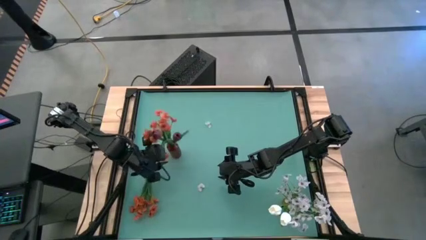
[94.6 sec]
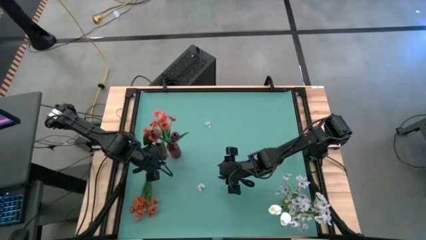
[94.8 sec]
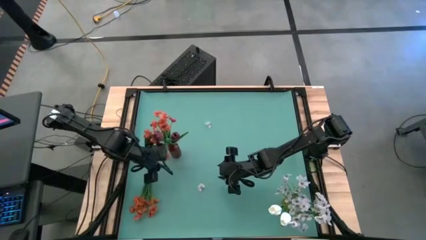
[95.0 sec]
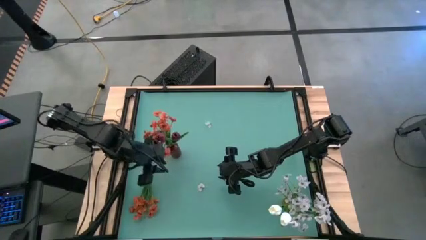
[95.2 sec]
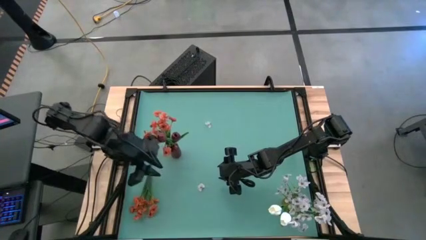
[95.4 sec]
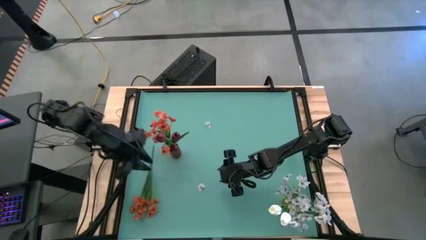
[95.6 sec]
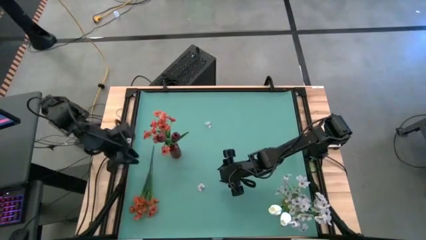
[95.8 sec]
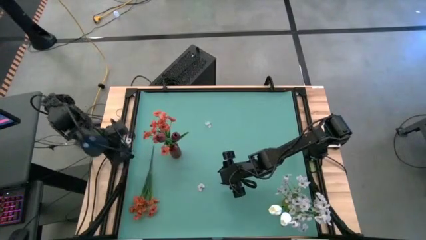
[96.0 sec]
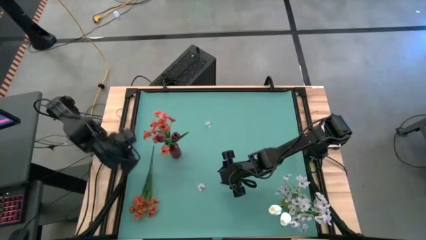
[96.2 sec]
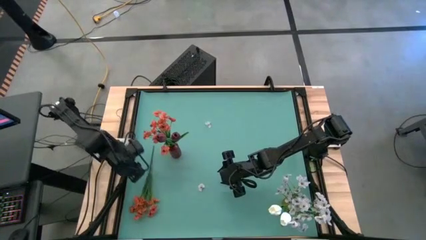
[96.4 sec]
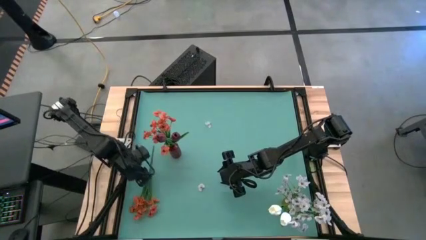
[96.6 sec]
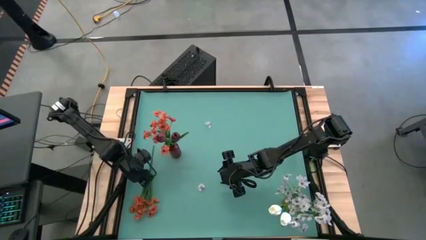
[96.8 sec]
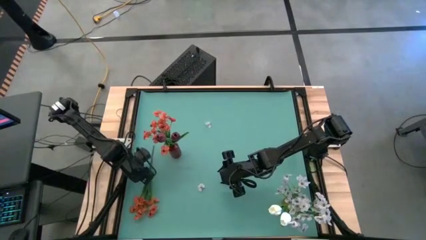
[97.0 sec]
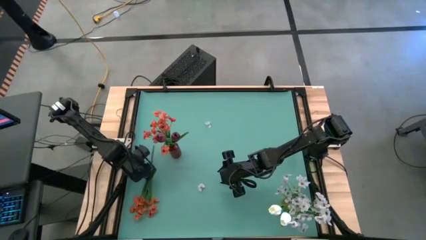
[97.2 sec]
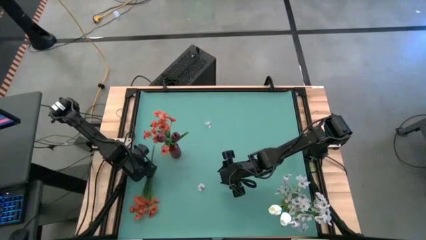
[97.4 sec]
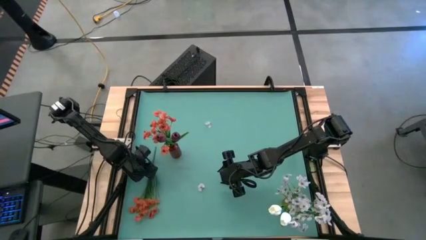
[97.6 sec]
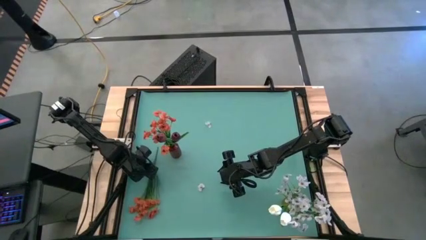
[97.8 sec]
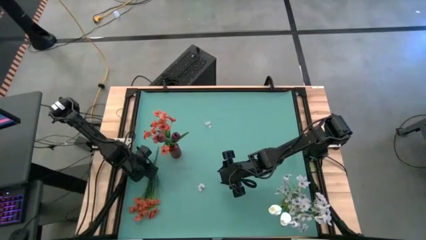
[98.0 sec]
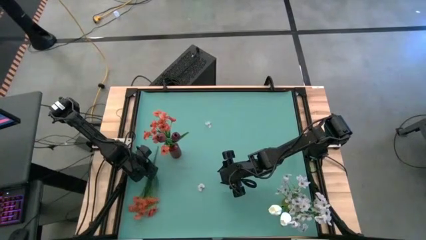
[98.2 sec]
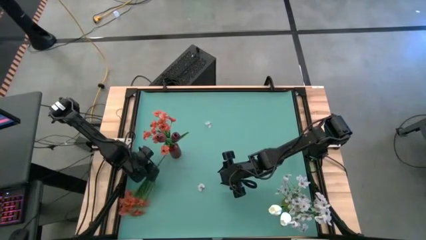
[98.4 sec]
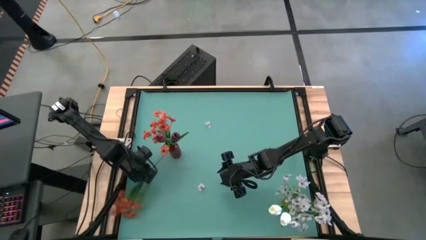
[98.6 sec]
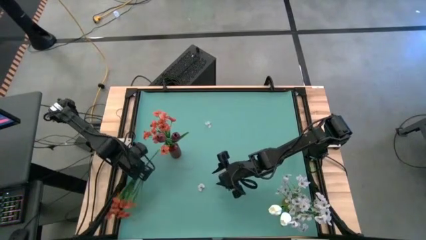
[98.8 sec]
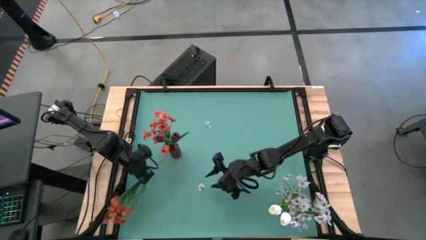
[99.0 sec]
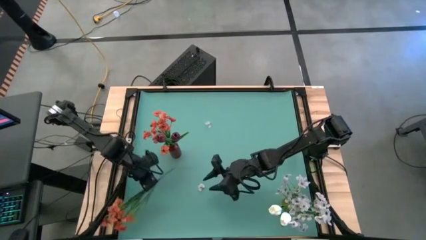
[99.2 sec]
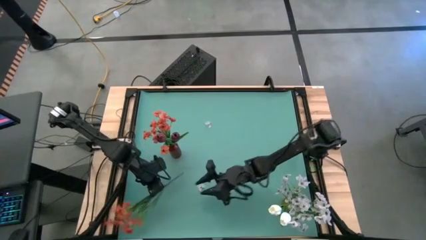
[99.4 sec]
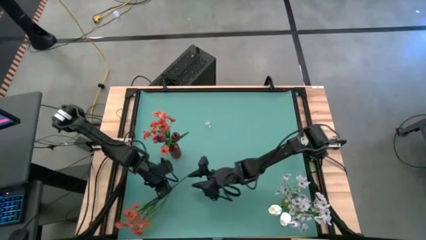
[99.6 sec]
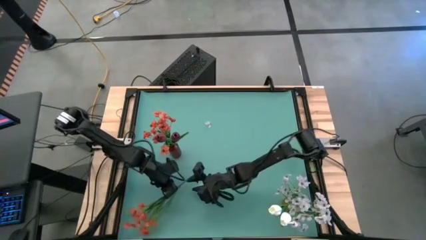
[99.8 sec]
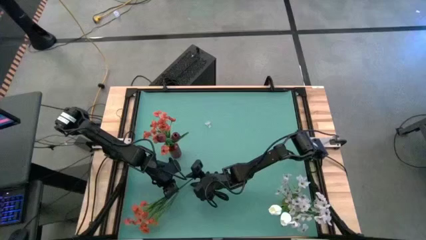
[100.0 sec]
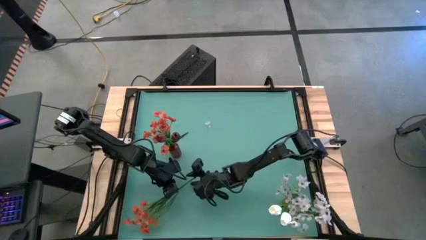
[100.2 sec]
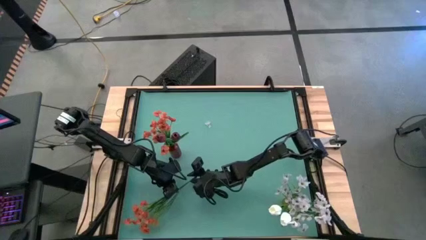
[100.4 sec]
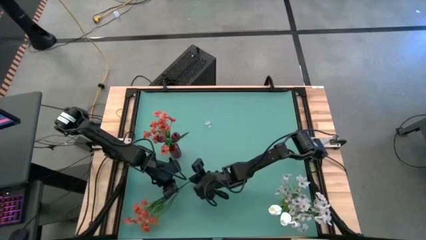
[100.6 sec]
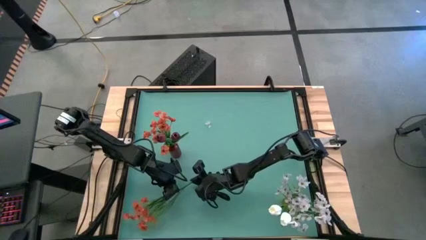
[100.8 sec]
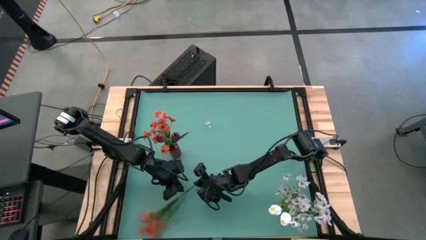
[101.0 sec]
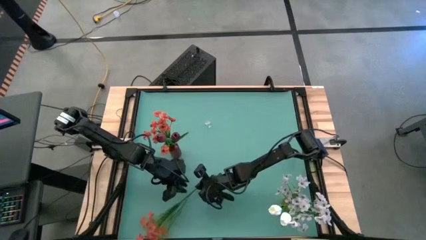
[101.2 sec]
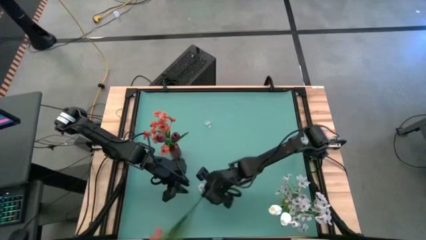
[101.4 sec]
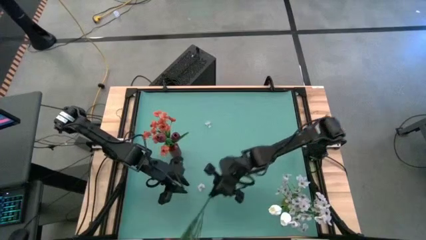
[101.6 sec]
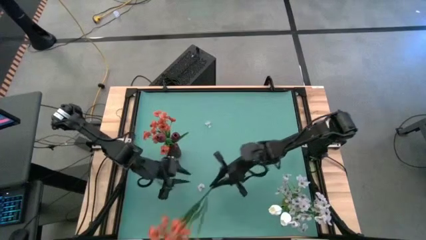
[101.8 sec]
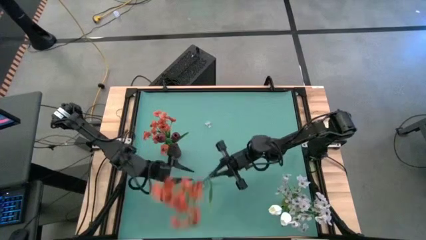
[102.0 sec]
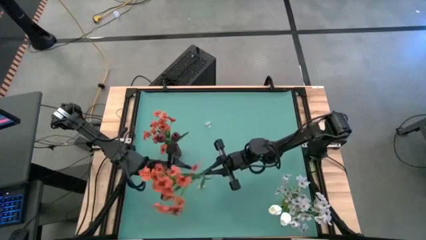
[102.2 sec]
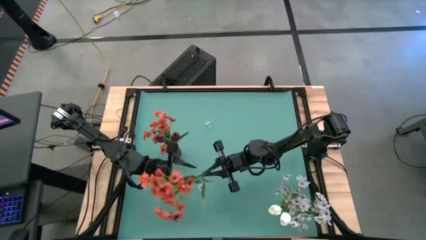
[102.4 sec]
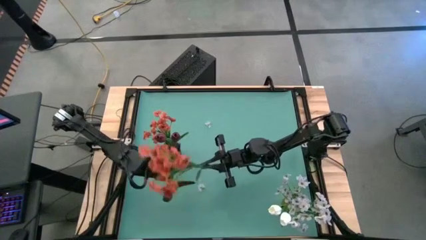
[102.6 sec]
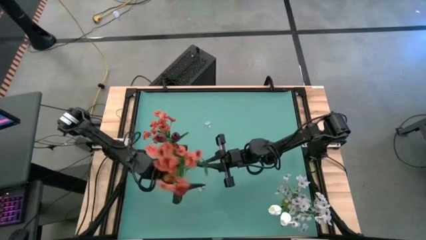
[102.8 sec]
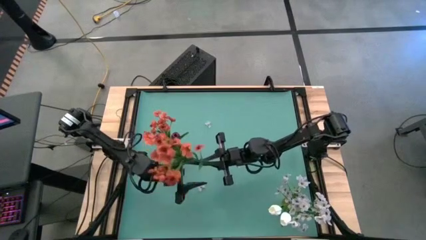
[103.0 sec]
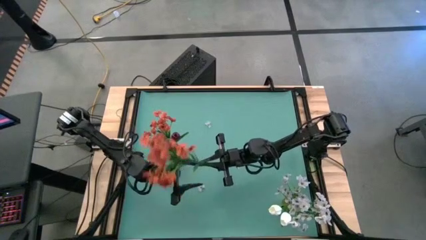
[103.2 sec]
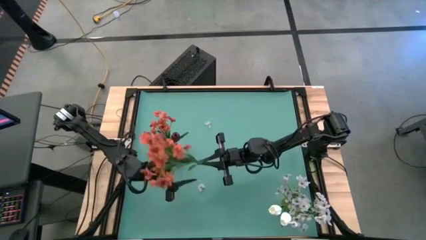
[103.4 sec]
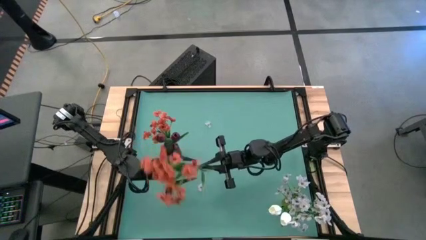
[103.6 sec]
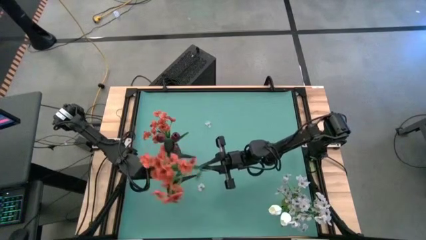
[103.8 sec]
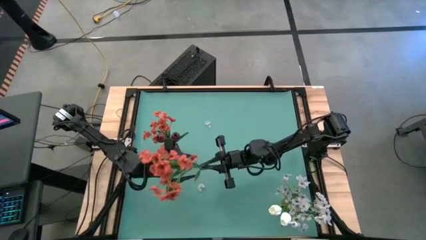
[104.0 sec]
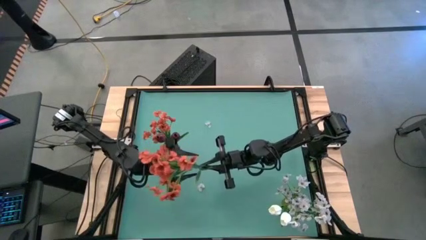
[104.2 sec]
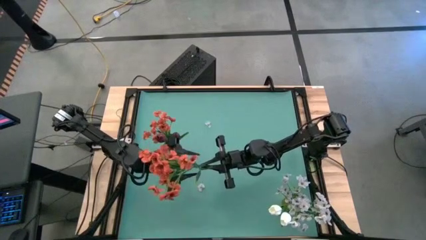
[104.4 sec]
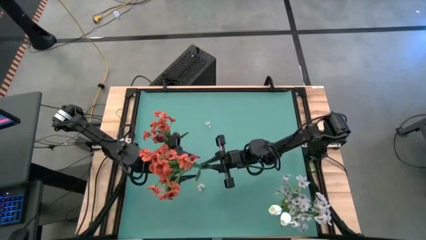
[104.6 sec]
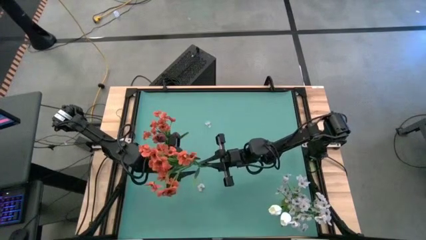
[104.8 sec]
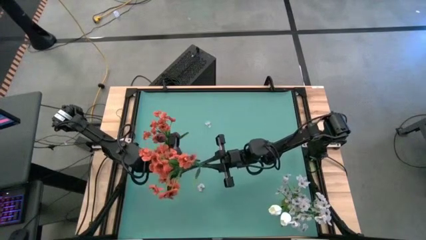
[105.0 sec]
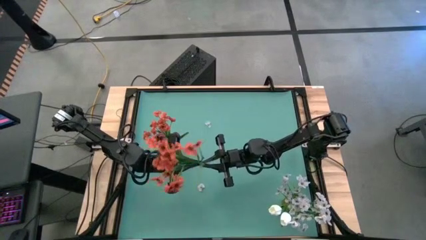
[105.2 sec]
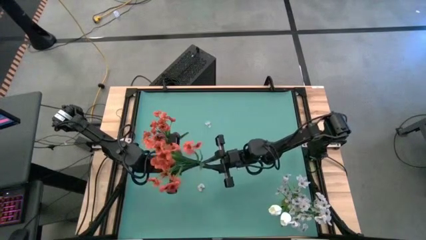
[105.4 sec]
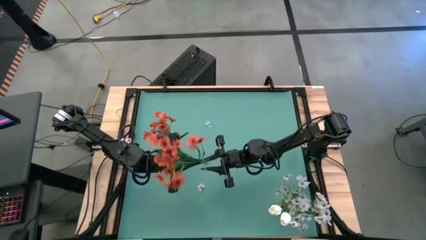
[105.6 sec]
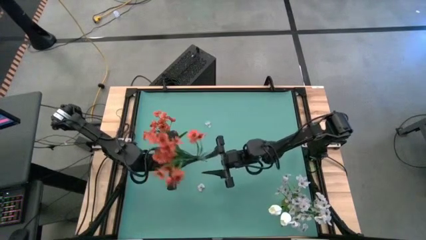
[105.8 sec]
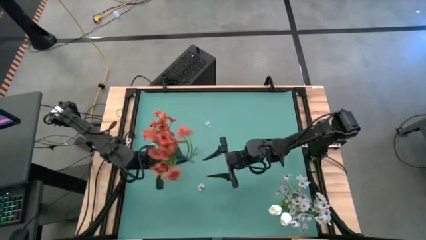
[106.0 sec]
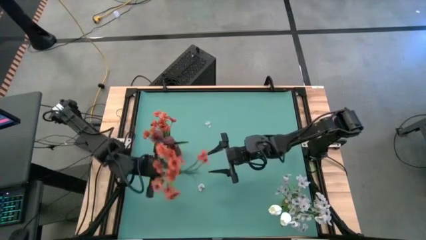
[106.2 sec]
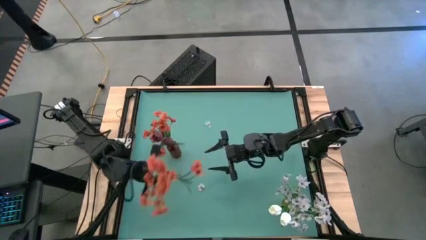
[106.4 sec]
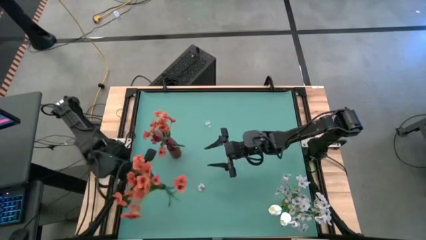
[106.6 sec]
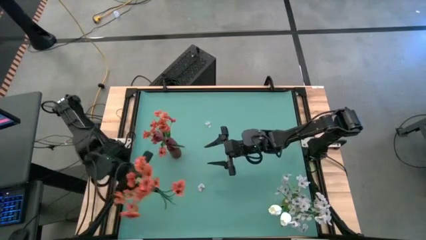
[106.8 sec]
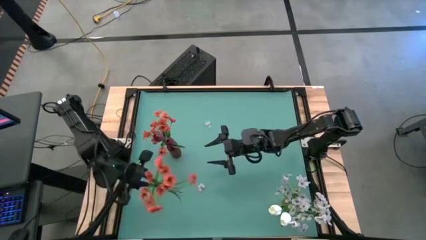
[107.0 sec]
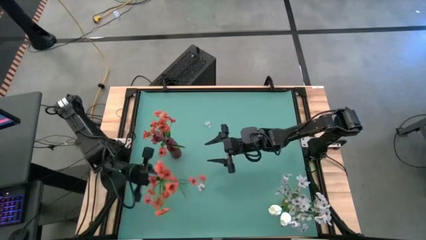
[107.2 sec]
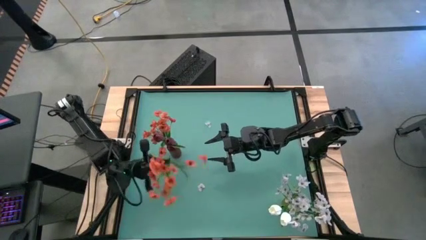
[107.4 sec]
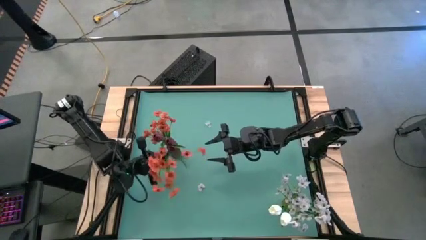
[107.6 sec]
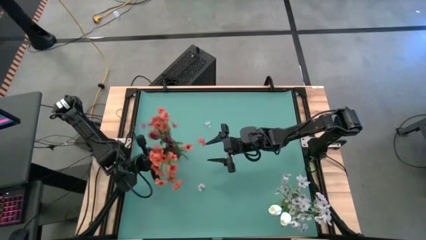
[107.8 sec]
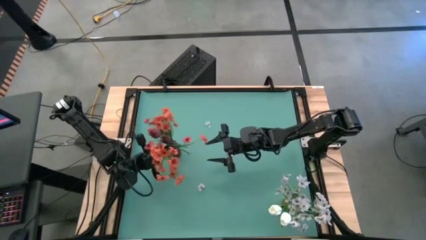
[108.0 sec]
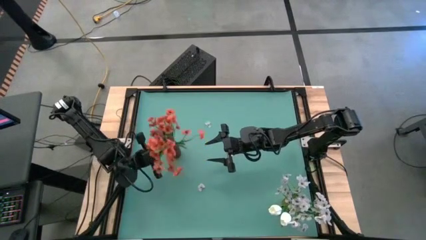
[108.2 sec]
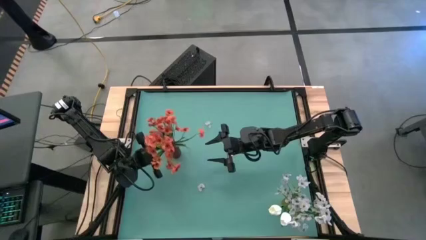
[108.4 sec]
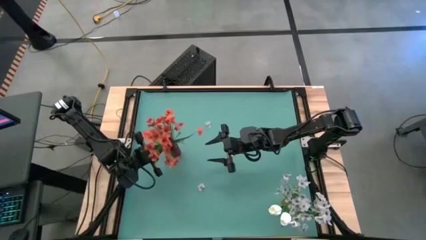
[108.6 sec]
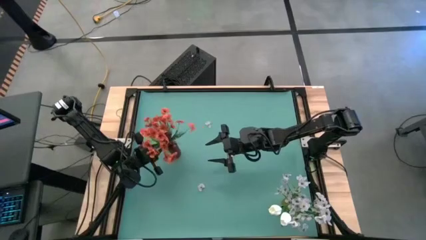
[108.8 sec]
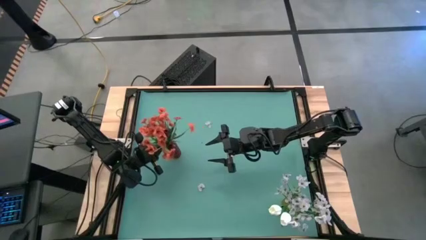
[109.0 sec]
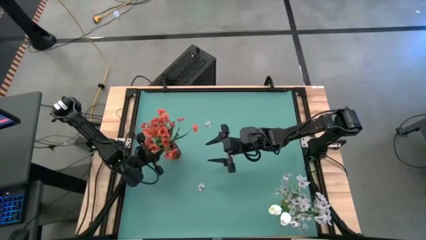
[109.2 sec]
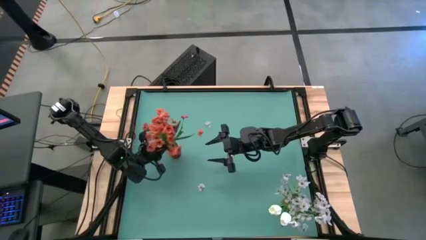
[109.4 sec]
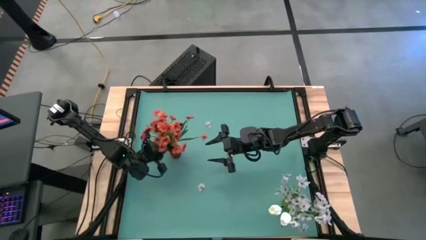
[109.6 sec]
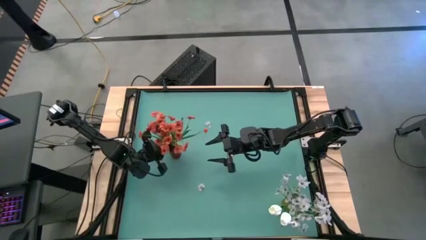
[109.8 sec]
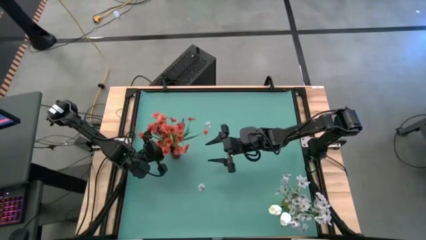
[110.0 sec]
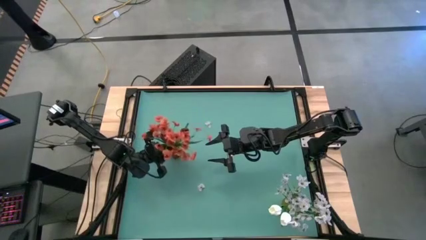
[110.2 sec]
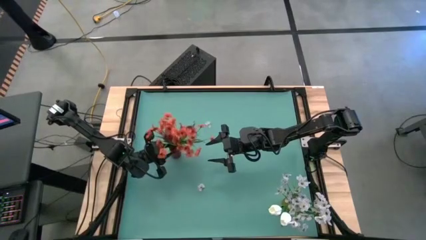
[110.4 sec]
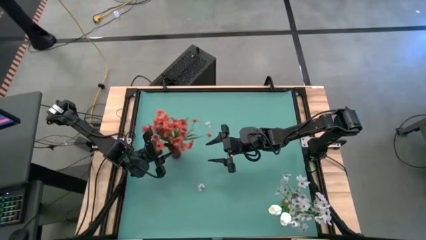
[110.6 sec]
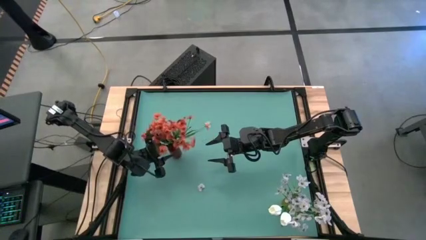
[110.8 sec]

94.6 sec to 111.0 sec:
Task: Sort flowers into vase by color
Put the orange flowers into the red vase
